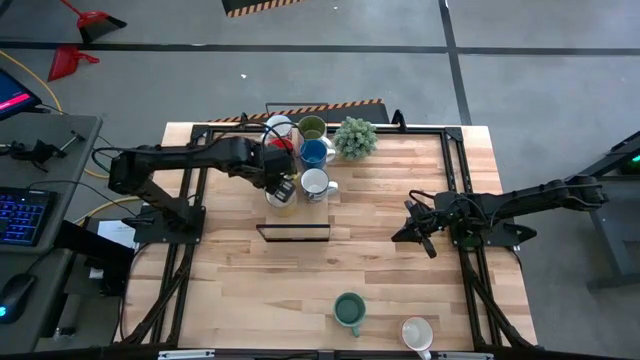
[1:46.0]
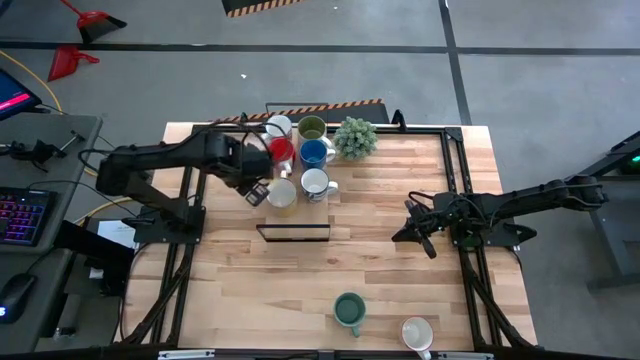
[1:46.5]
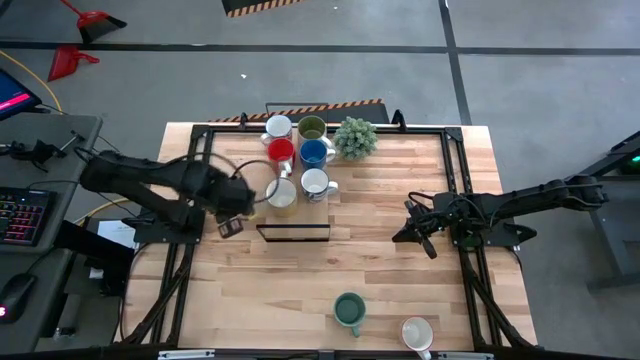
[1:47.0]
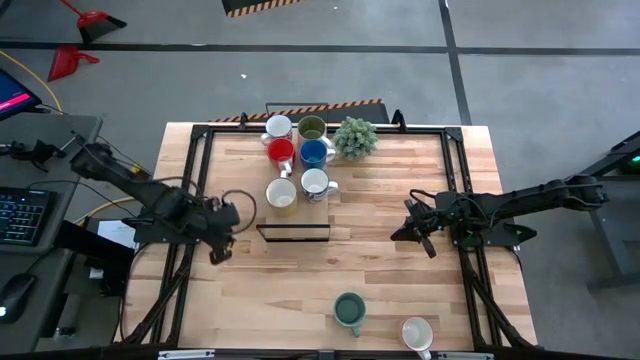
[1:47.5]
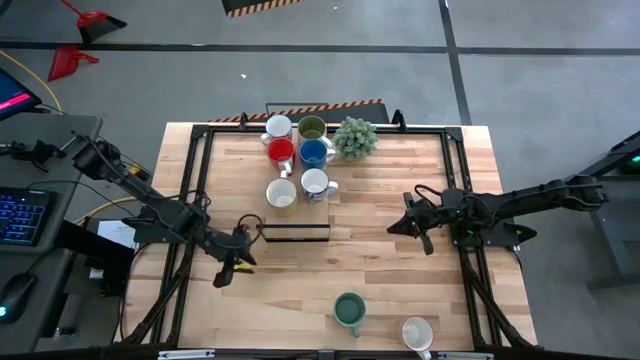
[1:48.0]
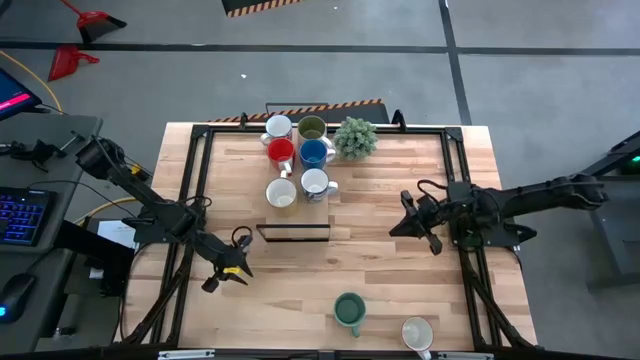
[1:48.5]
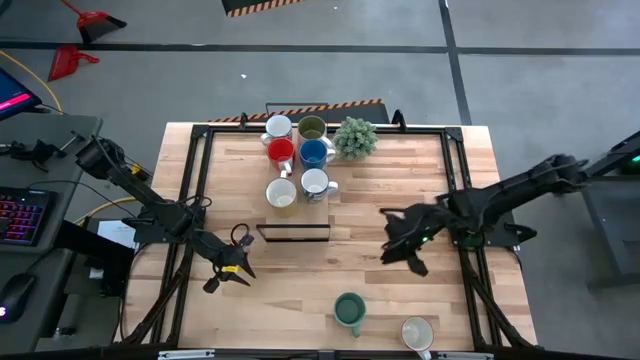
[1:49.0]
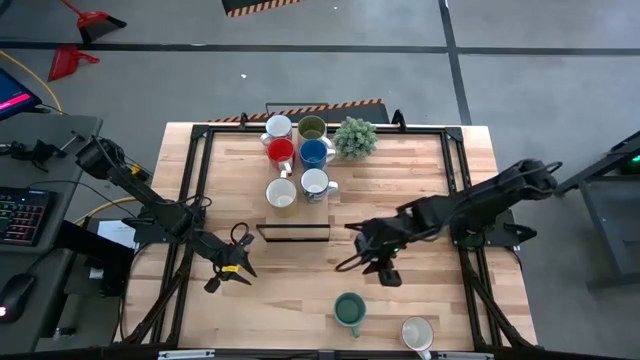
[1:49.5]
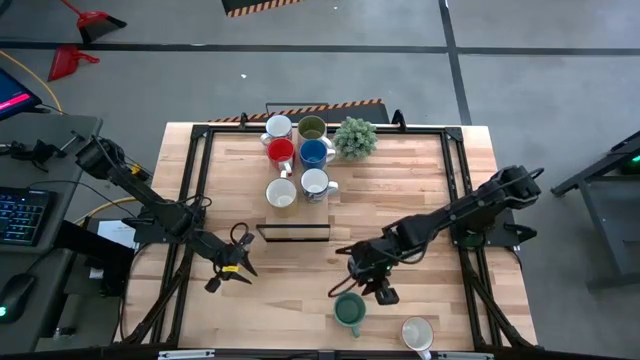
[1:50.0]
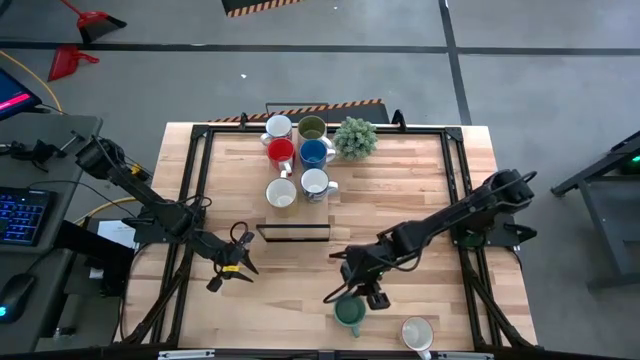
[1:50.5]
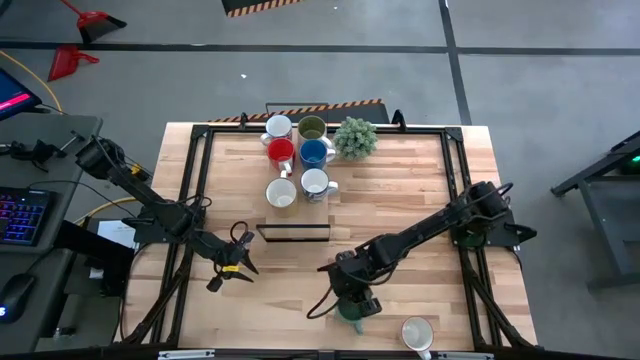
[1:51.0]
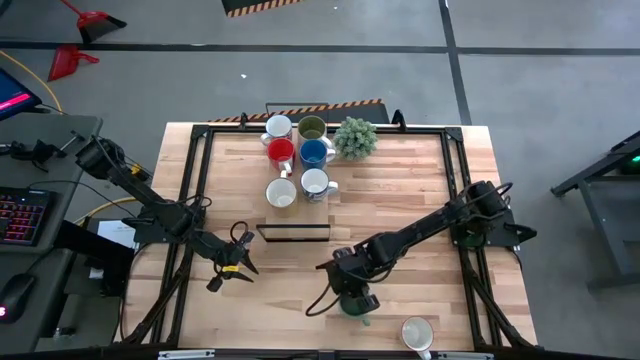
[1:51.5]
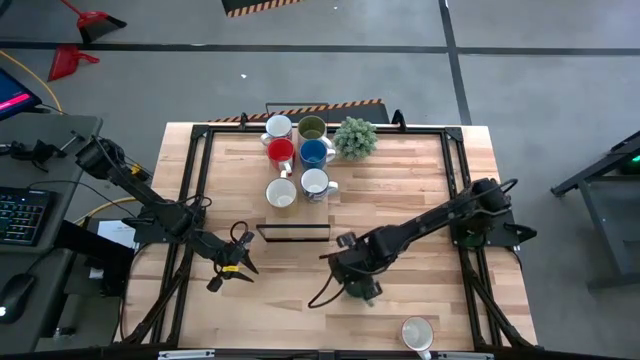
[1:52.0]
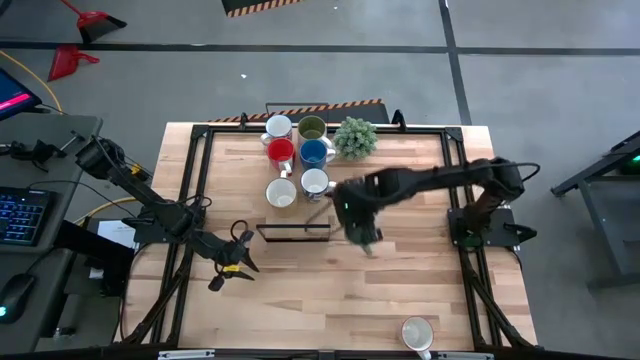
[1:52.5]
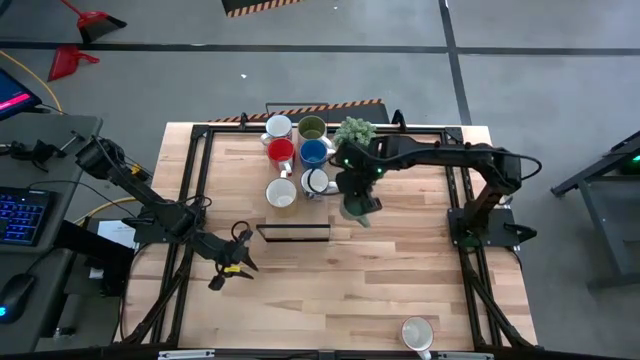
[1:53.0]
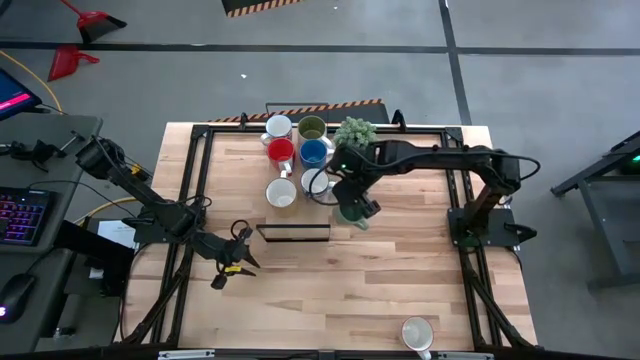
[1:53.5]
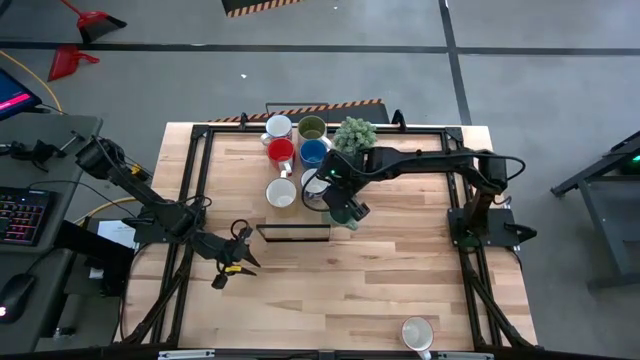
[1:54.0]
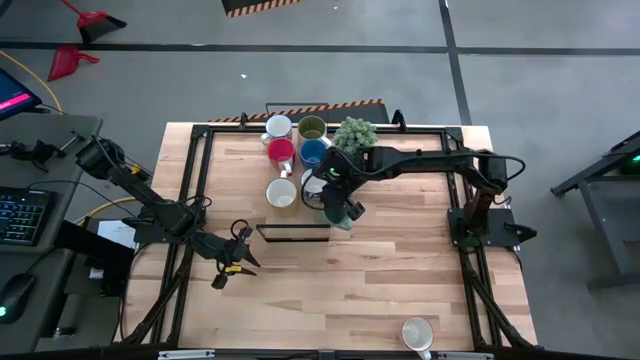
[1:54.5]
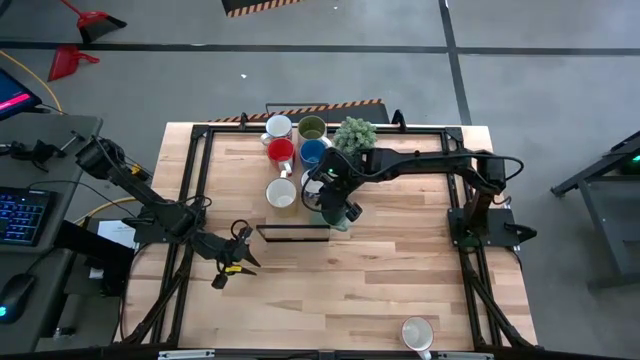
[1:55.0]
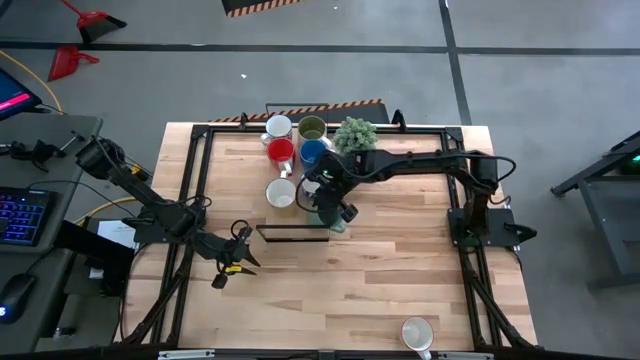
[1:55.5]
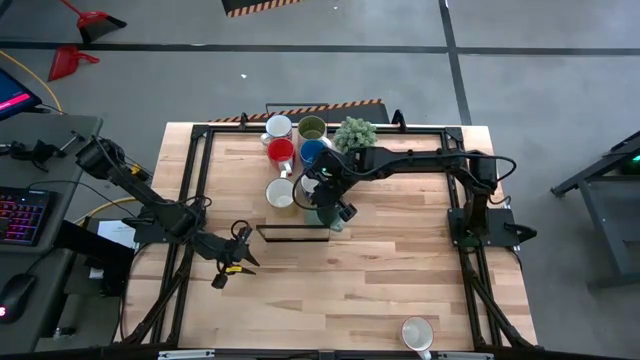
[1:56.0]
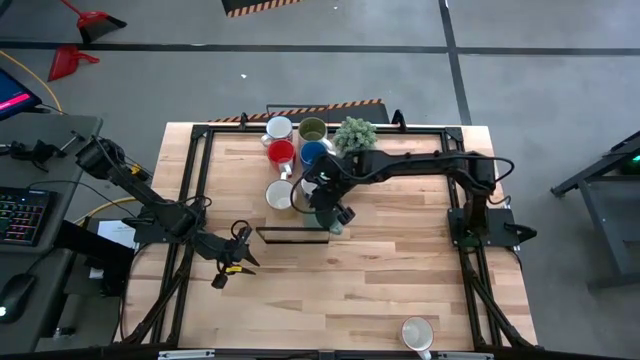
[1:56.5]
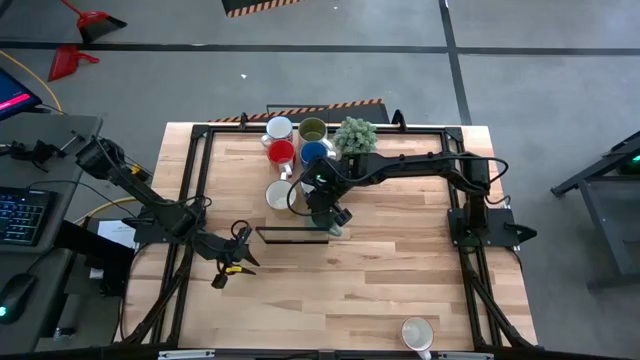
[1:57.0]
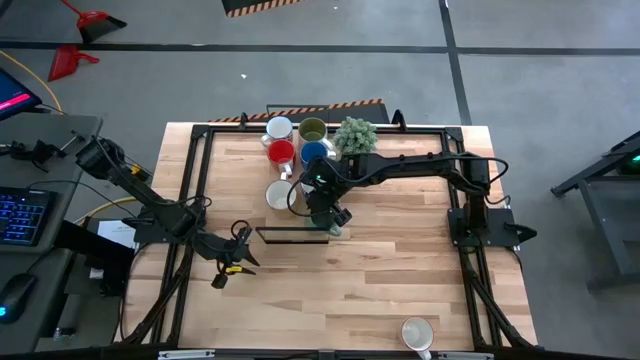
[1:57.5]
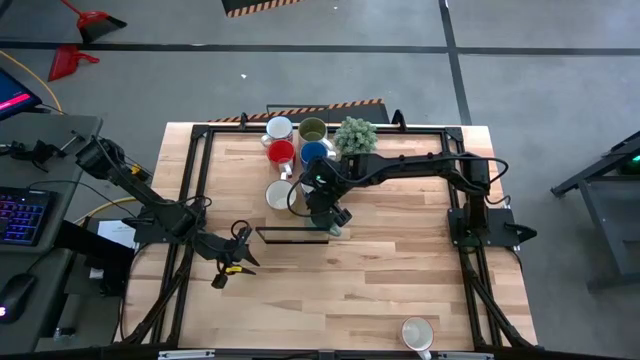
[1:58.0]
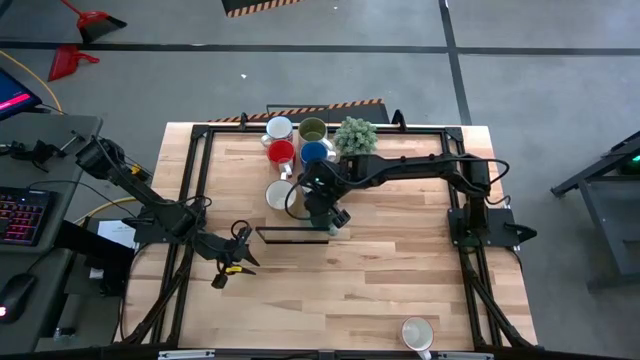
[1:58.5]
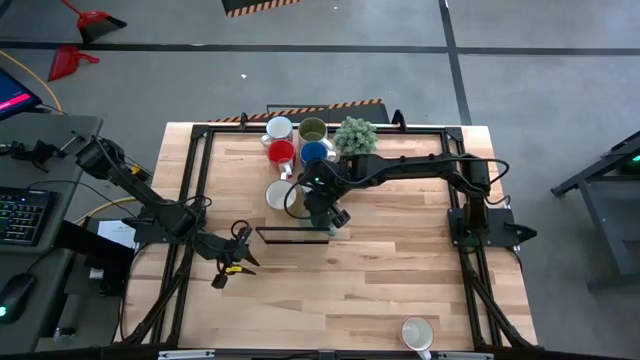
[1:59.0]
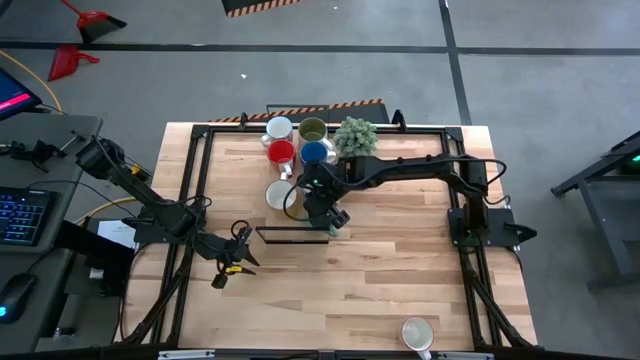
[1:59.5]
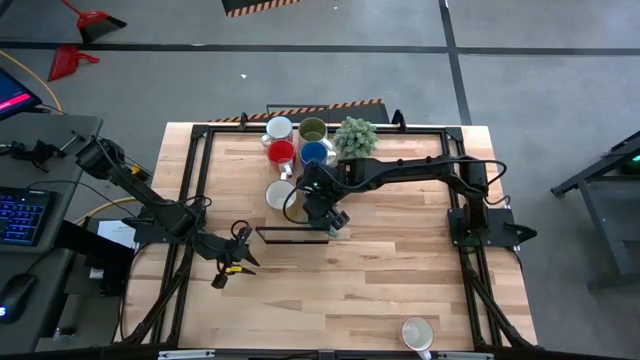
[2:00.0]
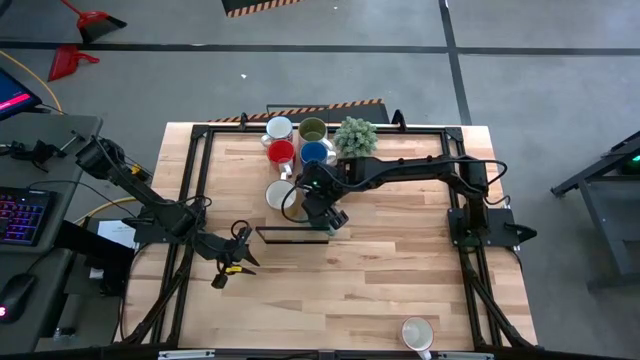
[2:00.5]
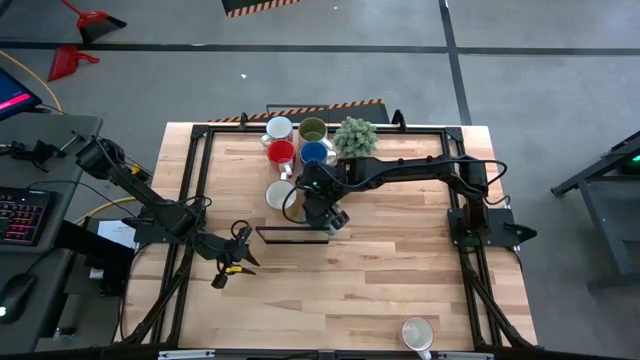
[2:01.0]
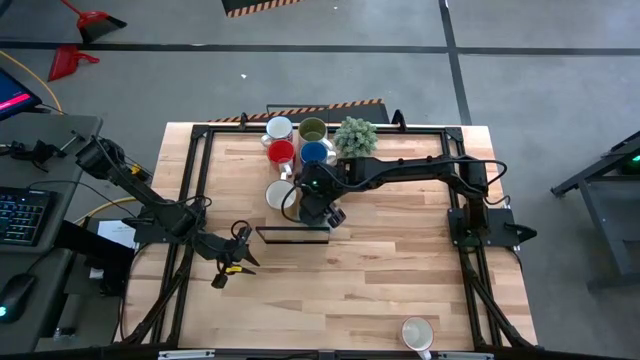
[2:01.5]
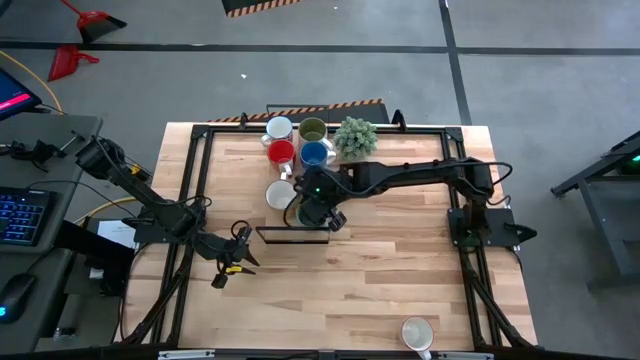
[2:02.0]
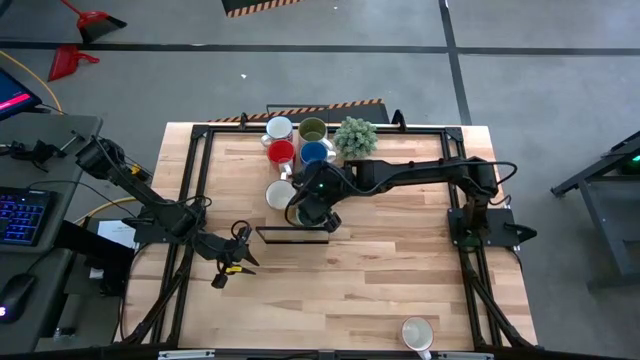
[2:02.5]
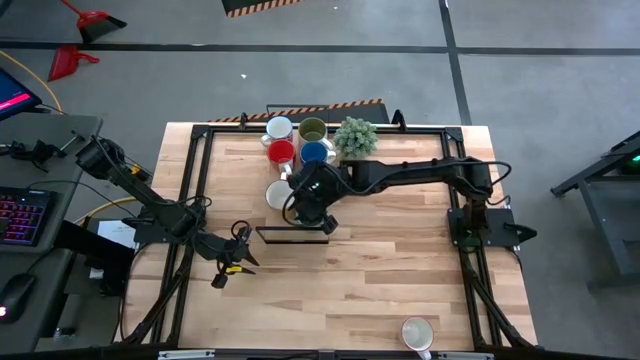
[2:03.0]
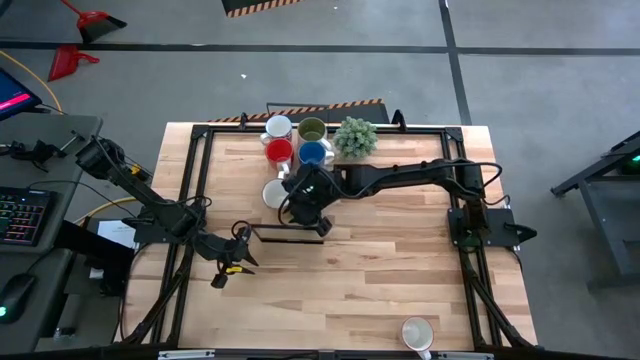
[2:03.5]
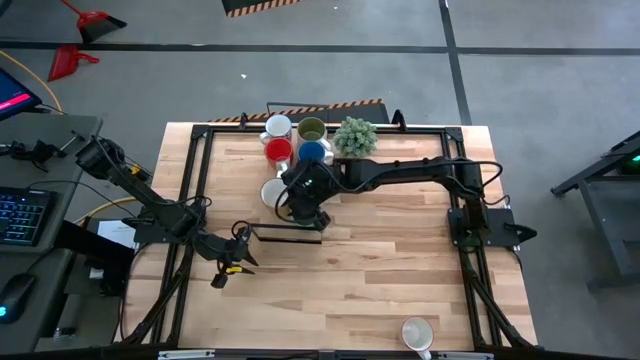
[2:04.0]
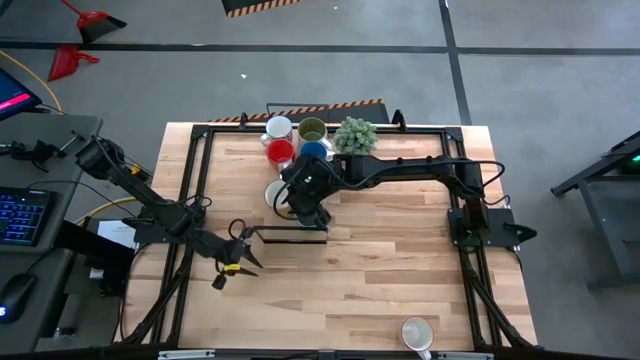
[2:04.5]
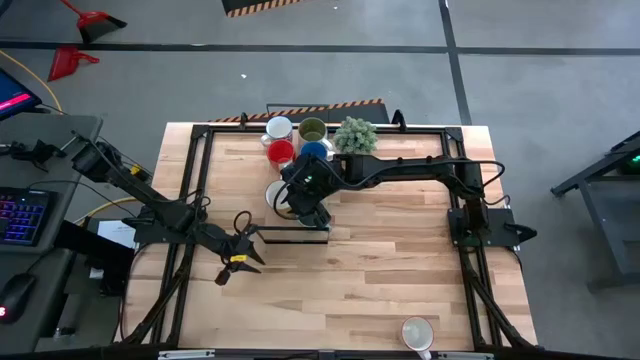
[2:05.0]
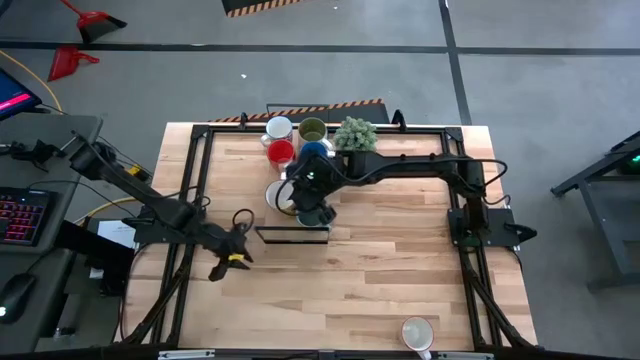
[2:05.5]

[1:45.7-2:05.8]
Task: Place coffee mugs
Put the green mug on the shelf
